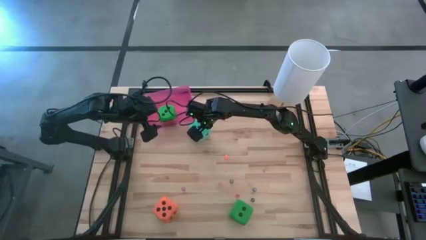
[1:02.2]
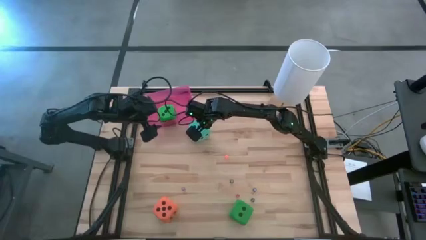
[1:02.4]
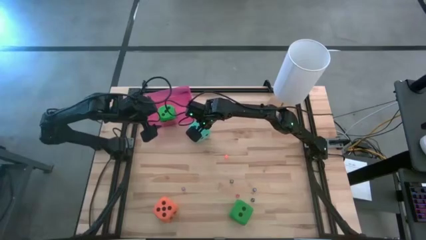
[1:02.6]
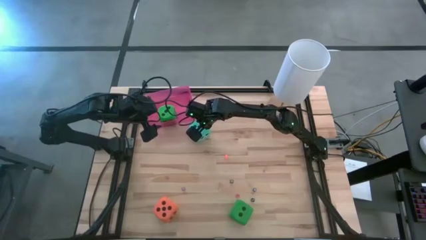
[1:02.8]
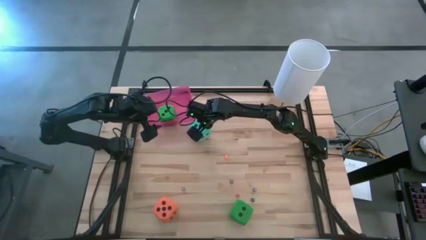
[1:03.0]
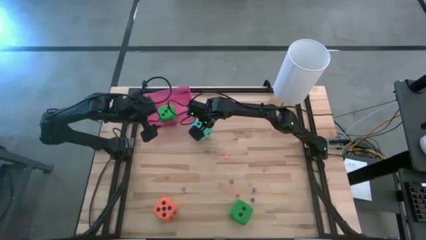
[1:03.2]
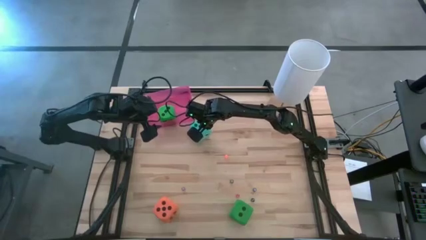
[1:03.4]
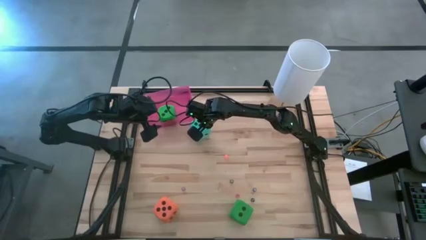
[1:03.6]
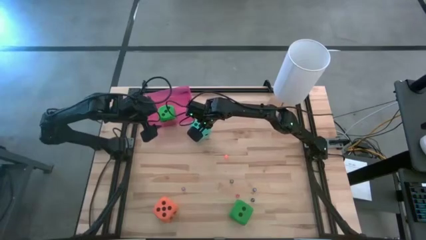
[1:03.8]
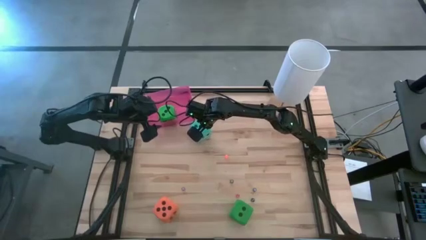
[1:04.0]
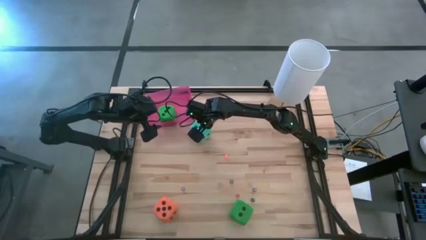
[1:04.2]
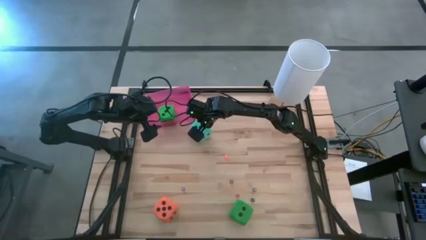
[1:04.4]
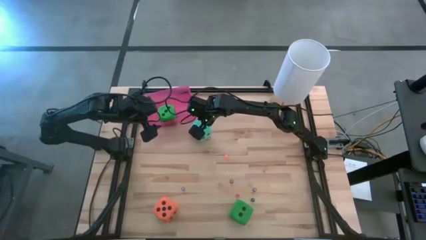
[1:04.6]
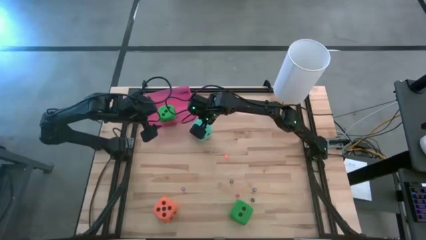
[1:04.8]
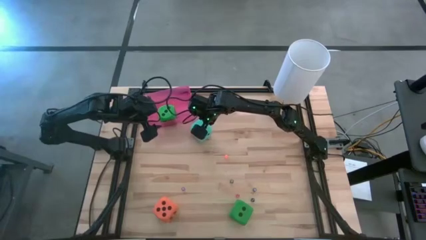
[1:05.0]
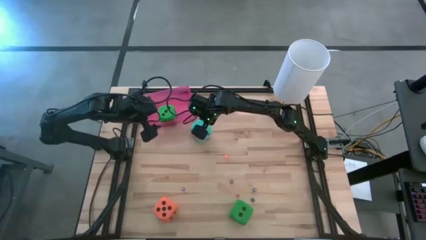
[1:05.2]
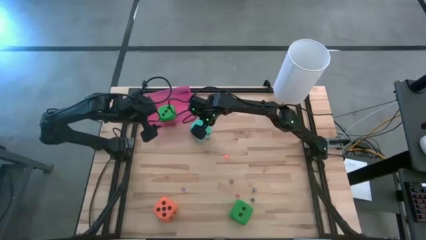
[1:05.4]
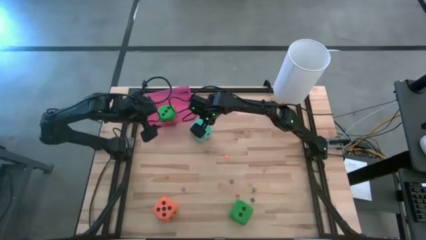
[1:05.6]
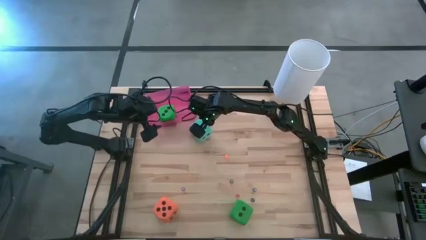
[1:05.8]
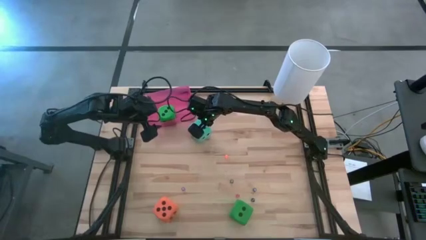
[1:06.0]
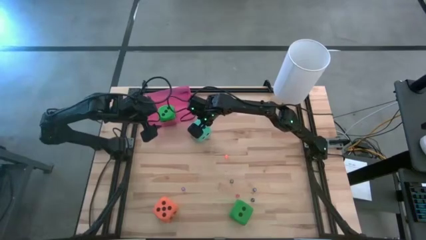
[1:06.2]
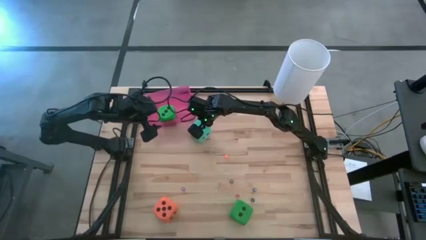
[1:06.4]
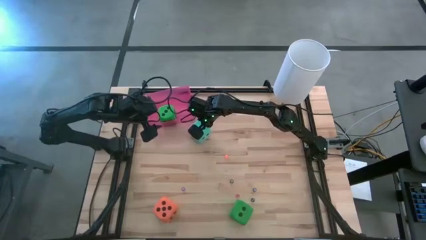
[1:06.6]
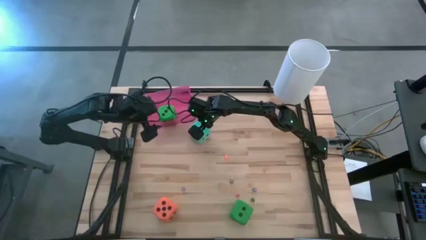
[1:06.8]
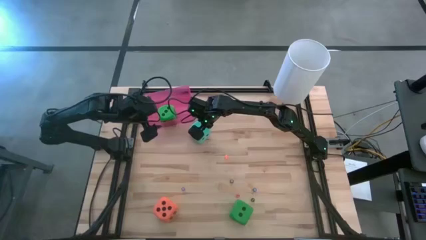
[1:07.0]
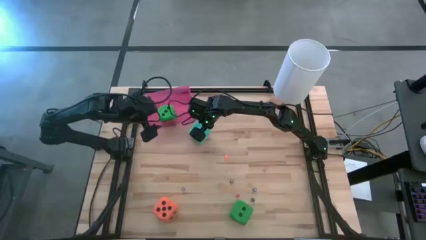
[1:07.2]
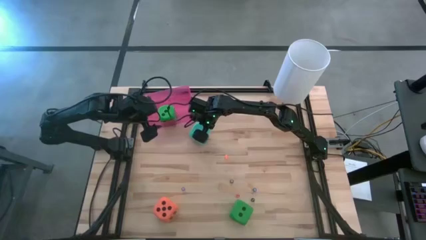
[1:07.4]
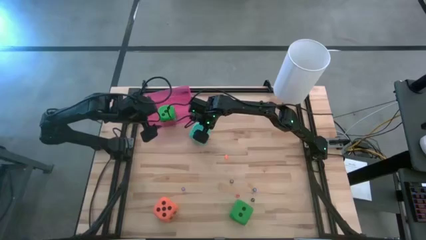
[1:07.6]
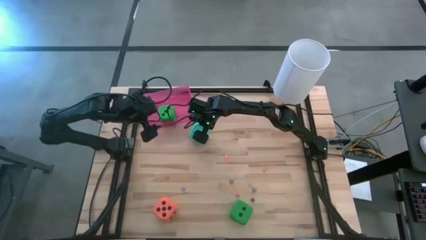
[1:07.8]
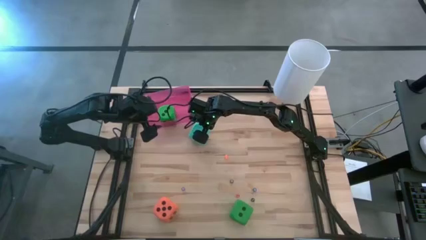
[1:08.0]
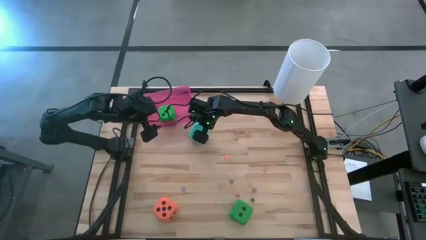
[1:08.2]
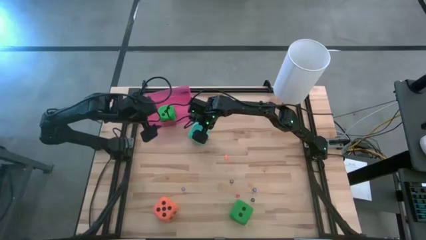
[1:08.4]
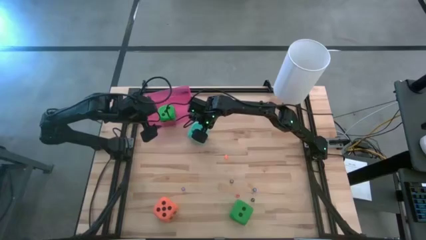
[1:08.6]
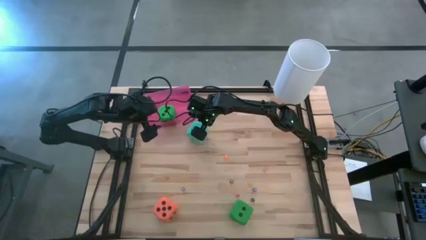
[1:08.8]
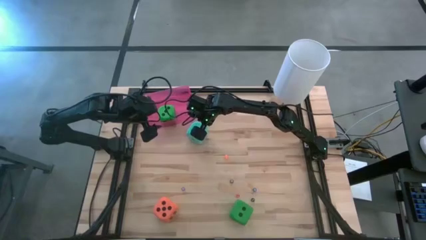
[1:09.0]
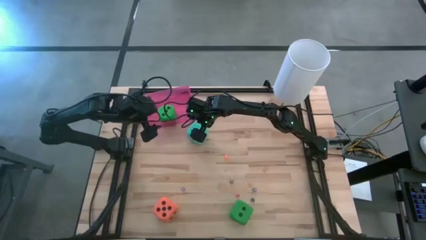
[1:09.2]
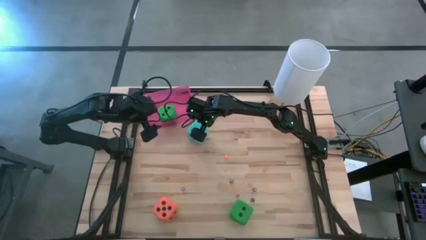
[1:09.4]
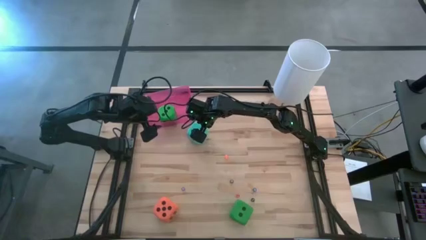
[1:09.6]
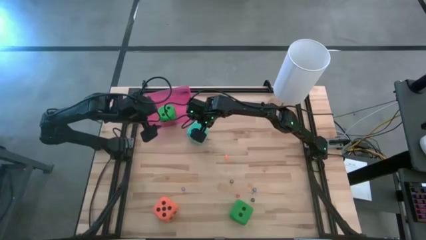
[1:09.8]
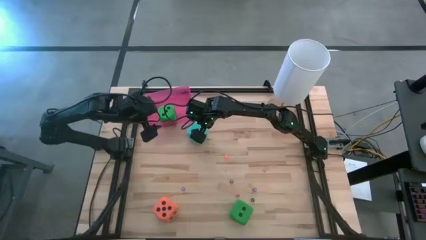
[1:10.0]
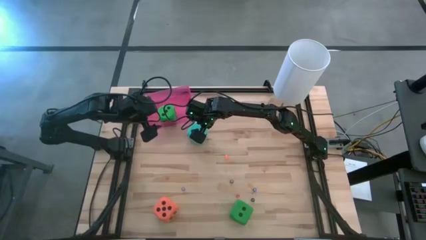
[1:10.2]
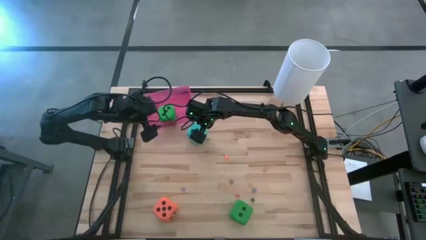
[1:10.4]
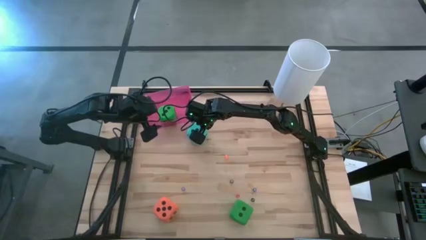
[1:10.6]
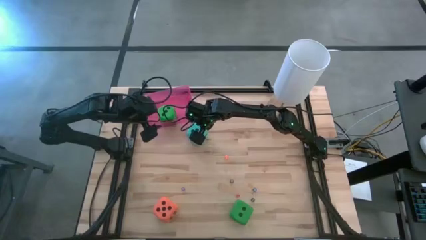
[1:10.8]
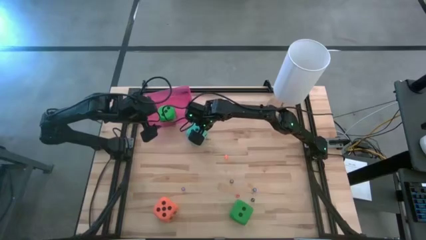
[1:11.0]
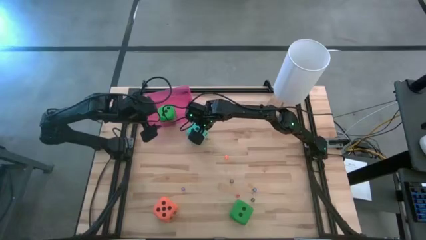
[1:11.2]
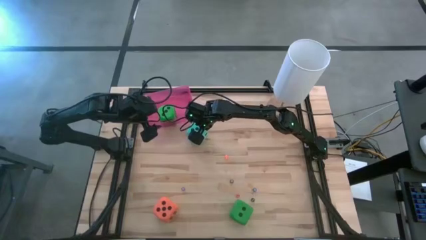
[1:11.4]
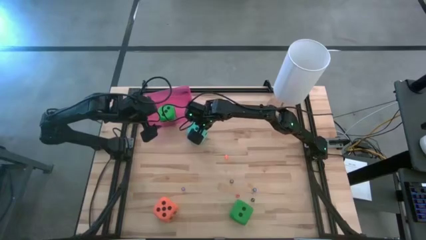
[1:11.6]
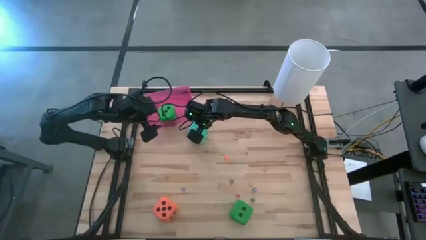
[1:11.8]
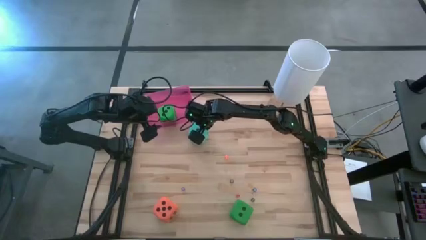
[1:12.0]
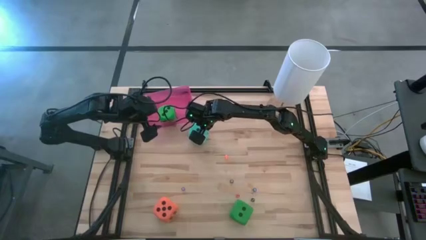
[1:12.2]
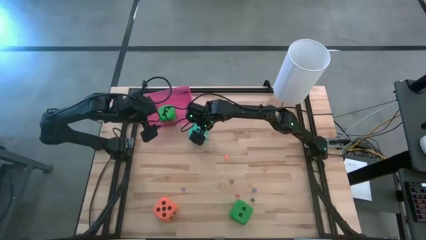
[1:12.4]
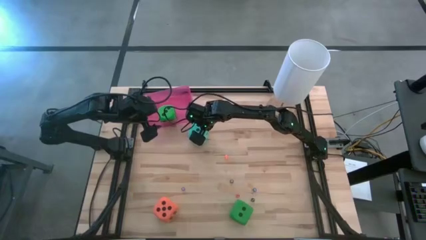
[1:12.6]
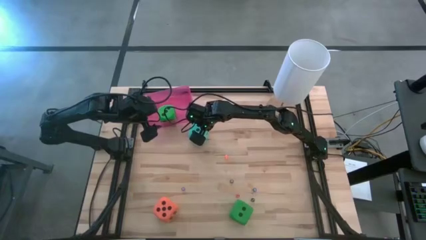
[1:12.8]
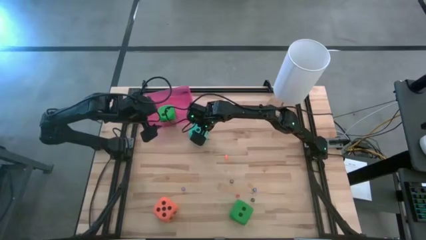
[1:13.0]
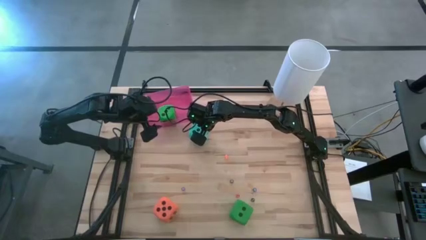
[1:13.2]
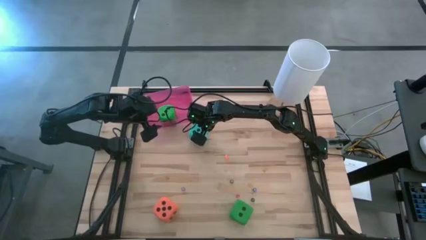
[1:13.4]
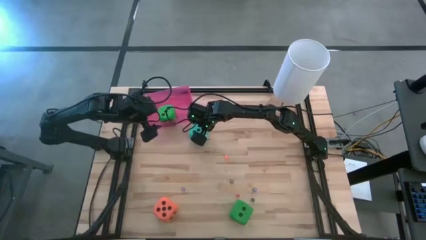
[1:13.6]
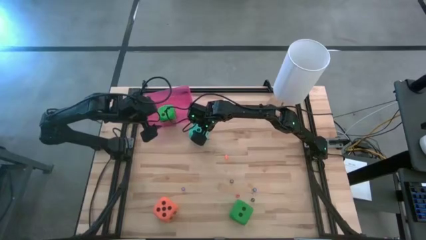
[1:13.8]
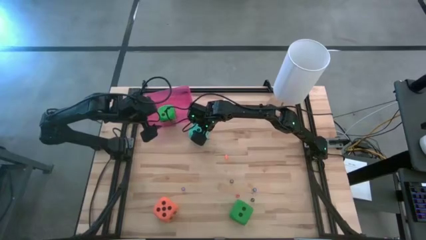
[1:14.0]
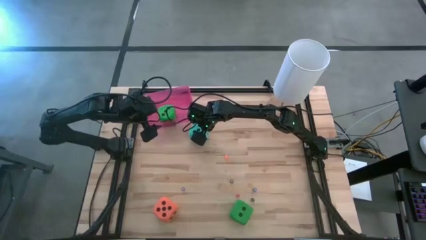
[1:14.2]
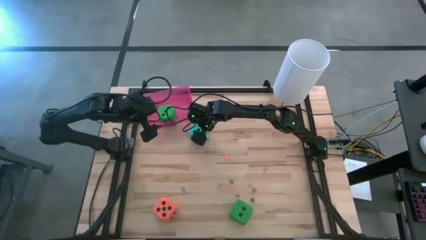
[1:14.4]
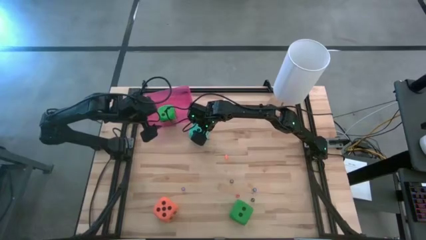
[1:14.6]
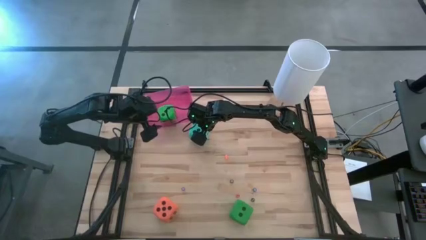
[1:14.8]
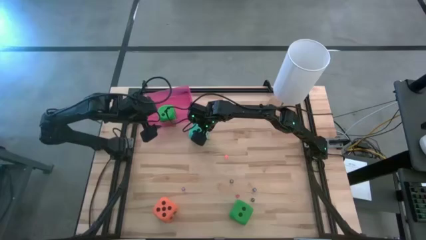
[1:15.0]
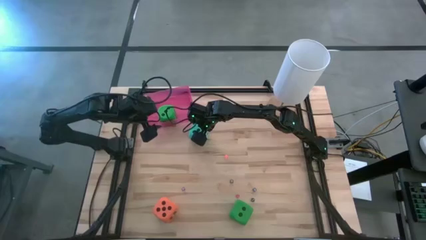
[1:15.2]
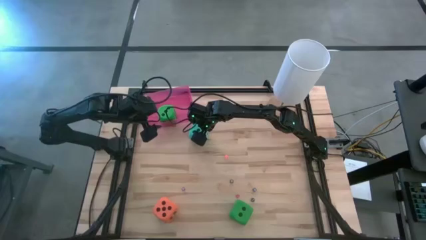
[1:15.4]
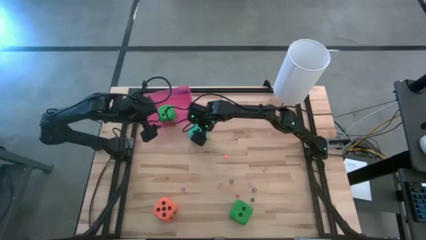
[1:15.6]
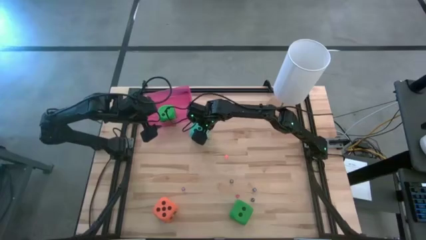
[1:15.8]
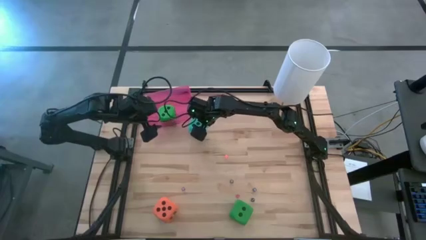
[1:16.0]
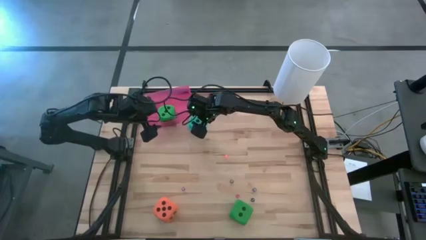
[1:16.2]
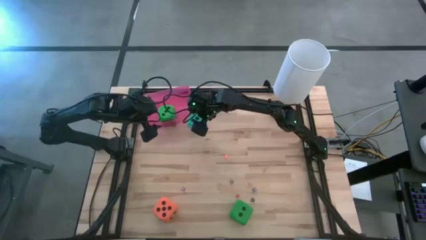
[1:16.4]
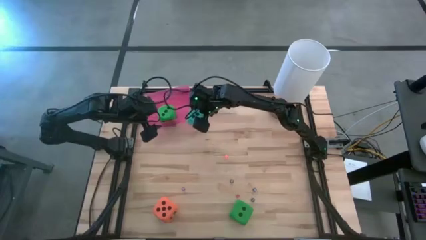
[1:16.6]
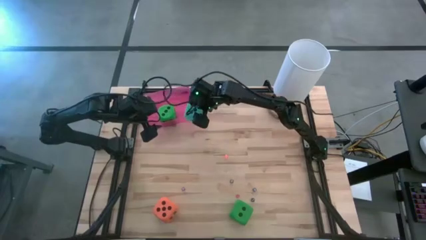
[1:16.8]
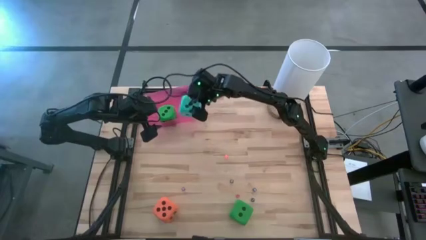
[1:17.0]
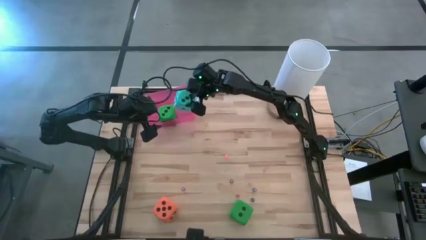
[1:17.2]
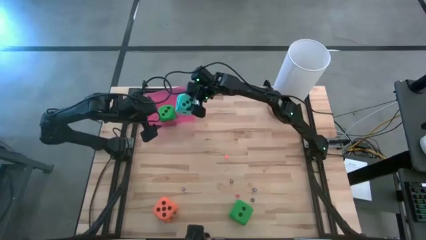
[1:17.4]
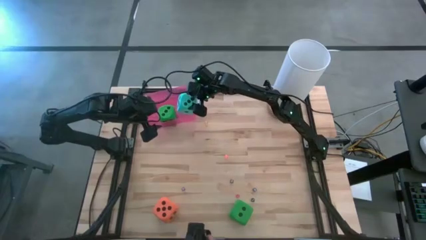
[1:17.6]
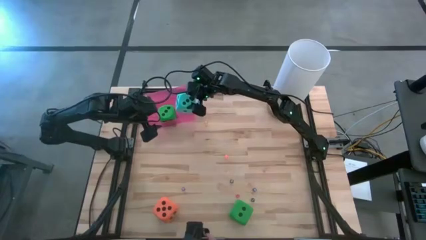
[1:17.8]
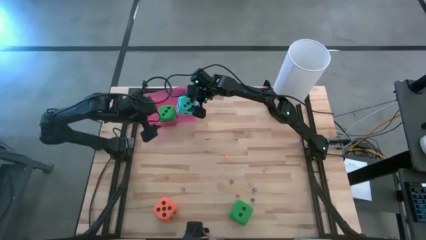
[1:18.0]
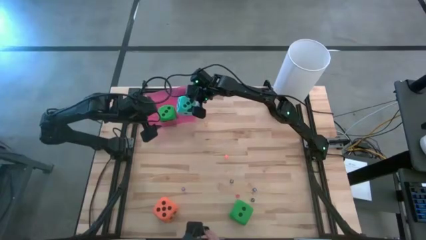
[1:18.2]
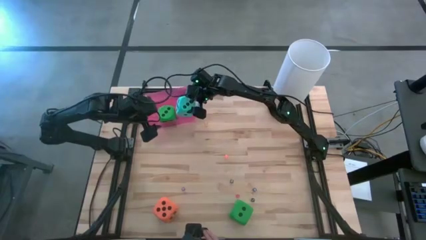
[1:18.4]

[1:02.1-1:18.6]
Task: Pick & Place Dice
Put the big blue dice into the red bin
